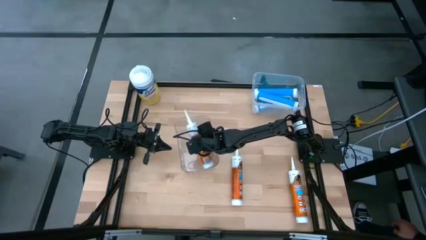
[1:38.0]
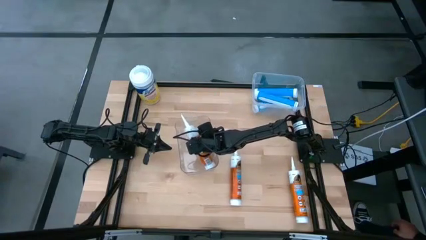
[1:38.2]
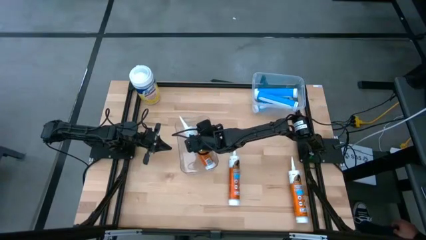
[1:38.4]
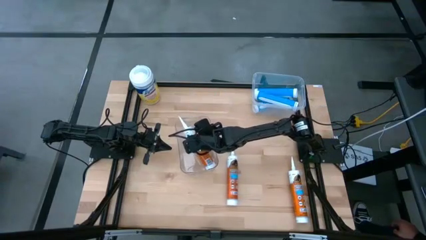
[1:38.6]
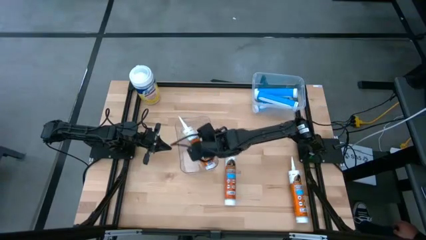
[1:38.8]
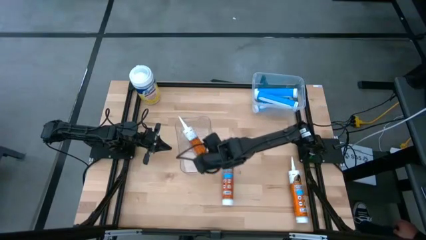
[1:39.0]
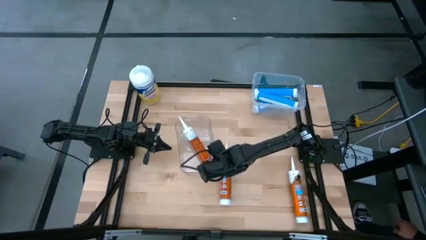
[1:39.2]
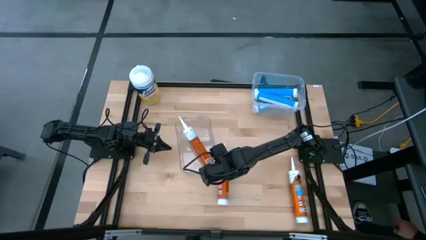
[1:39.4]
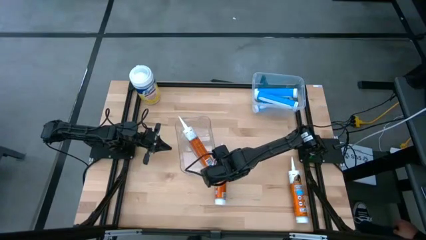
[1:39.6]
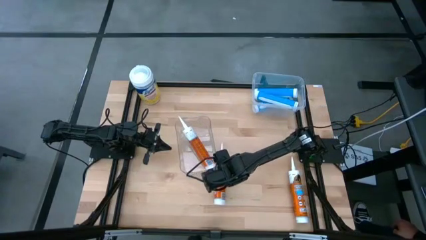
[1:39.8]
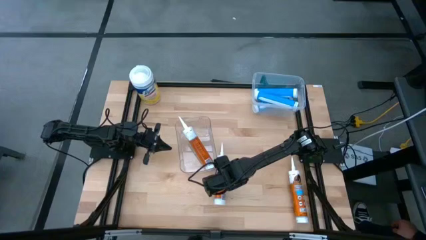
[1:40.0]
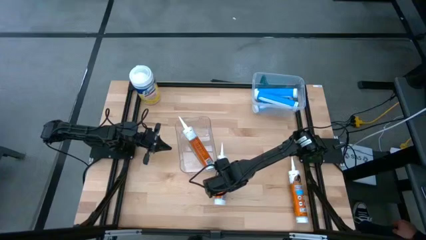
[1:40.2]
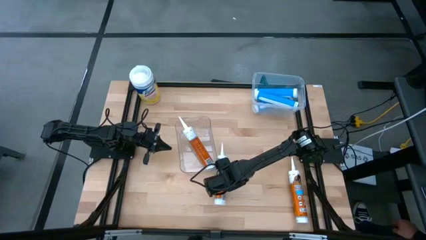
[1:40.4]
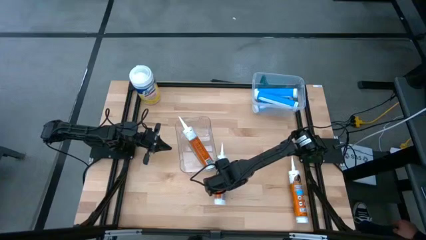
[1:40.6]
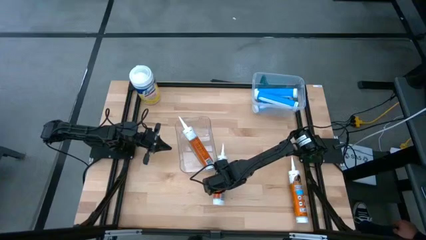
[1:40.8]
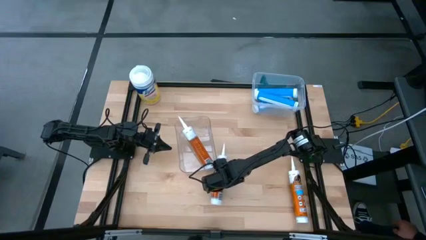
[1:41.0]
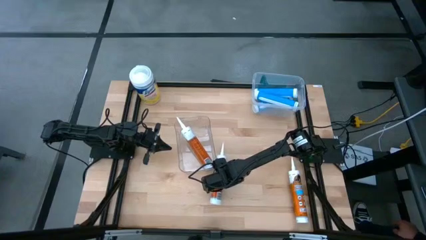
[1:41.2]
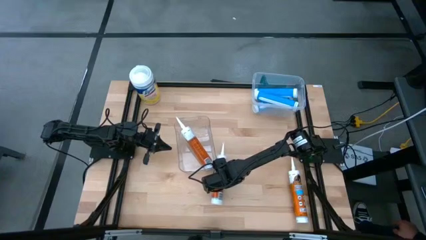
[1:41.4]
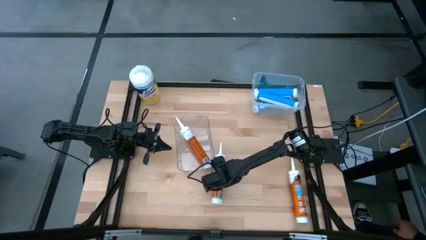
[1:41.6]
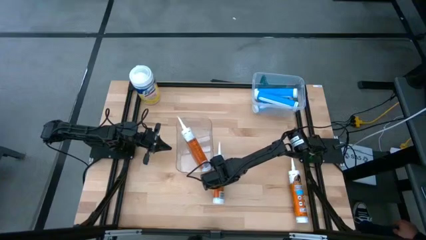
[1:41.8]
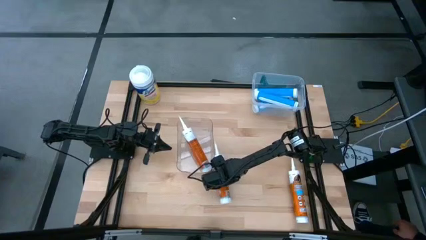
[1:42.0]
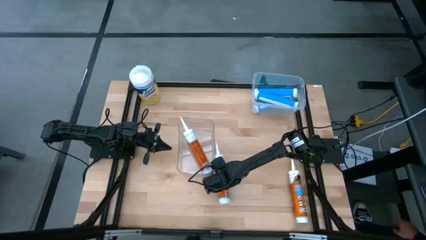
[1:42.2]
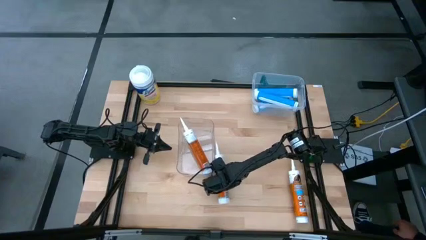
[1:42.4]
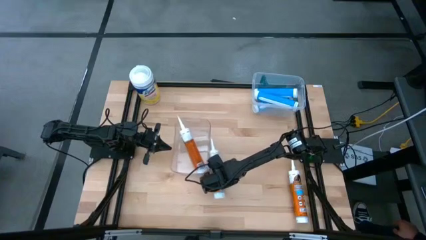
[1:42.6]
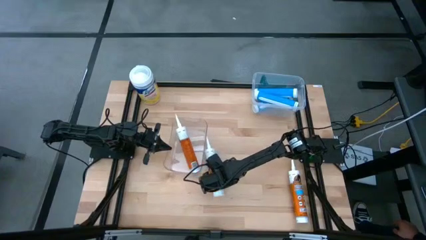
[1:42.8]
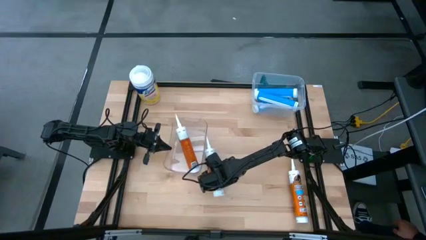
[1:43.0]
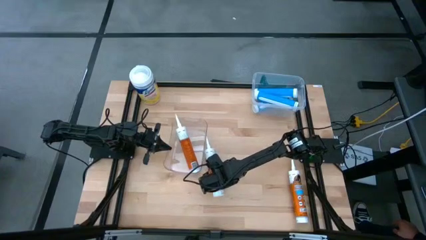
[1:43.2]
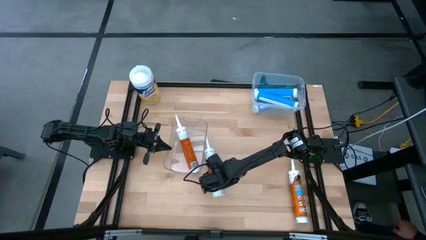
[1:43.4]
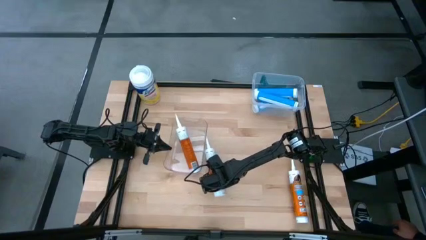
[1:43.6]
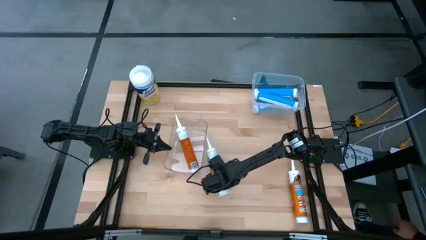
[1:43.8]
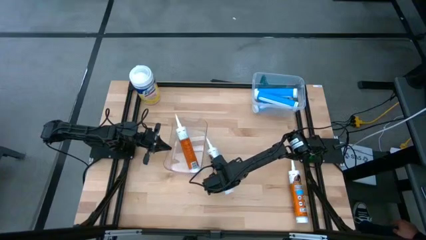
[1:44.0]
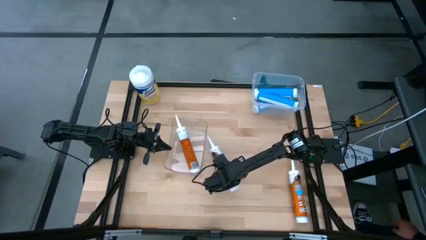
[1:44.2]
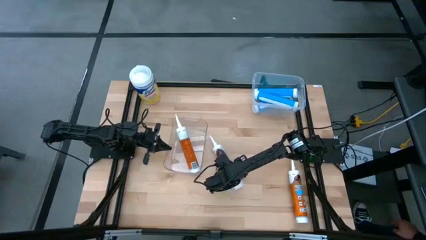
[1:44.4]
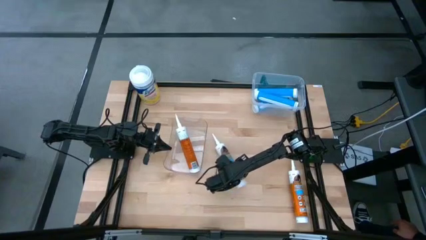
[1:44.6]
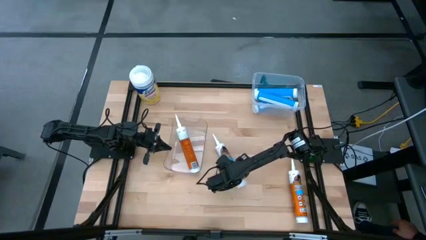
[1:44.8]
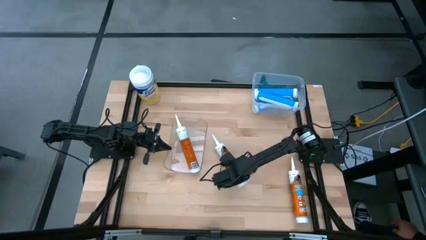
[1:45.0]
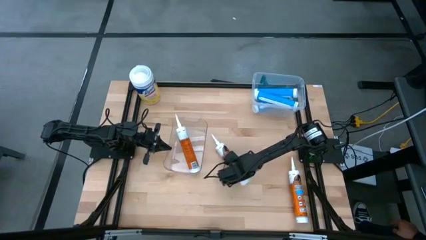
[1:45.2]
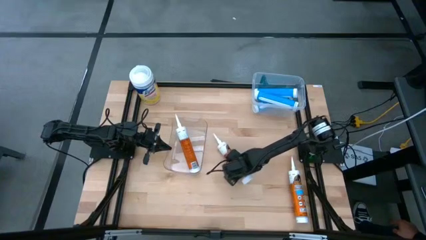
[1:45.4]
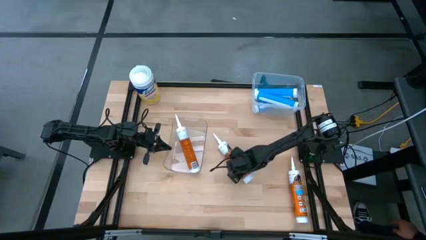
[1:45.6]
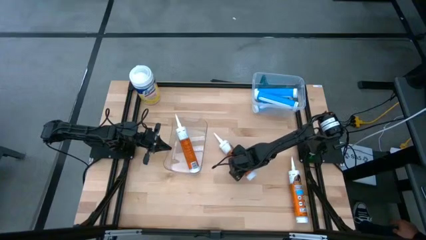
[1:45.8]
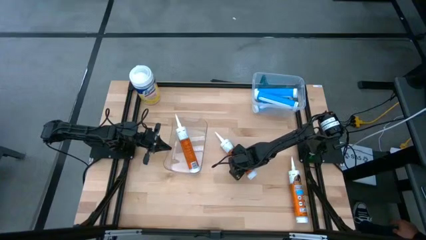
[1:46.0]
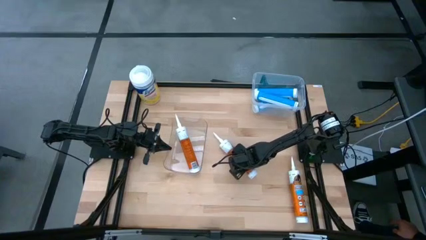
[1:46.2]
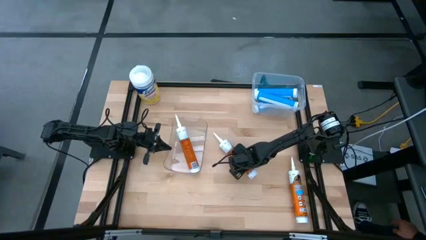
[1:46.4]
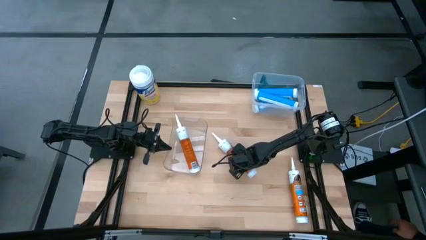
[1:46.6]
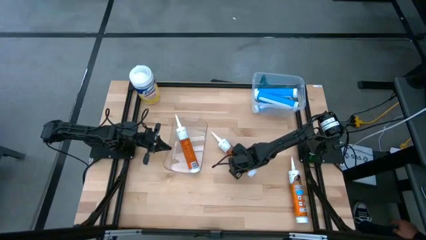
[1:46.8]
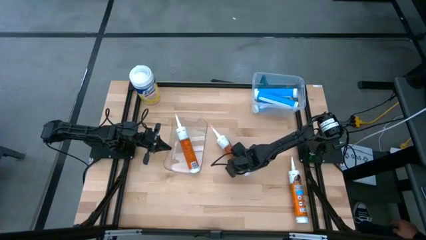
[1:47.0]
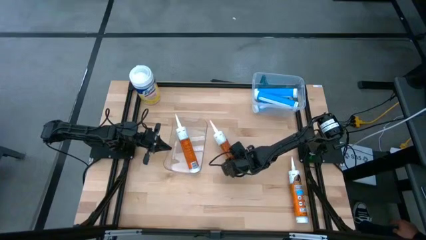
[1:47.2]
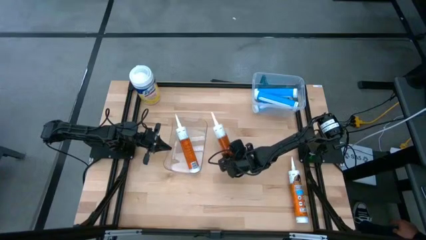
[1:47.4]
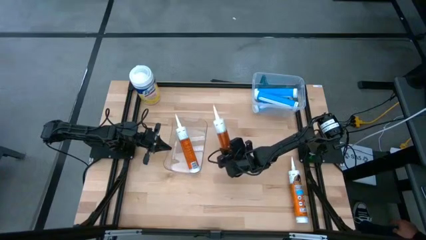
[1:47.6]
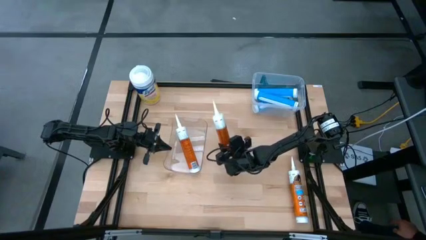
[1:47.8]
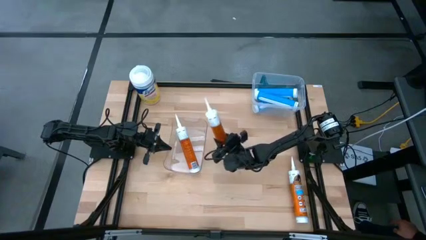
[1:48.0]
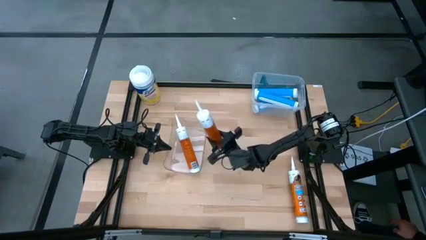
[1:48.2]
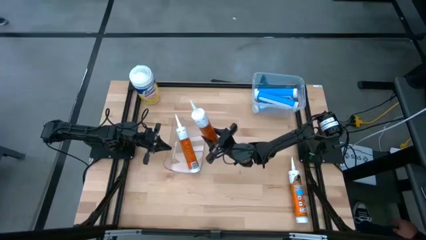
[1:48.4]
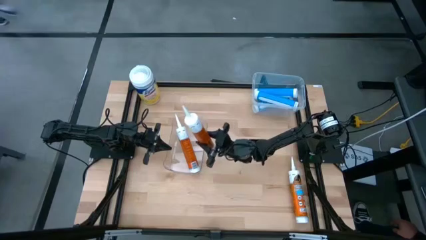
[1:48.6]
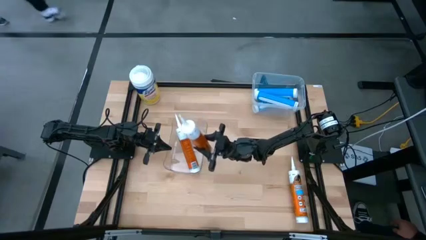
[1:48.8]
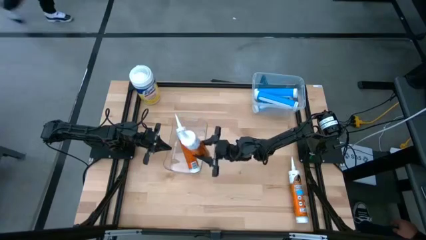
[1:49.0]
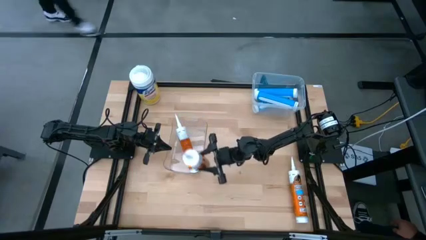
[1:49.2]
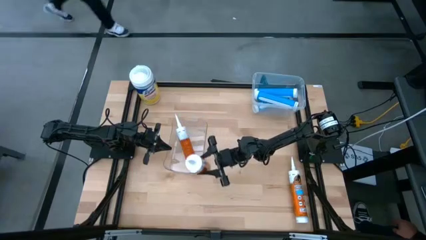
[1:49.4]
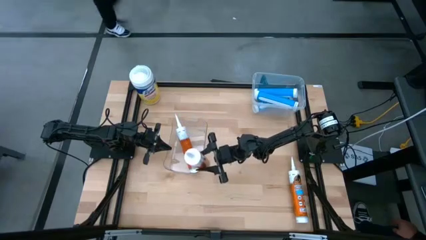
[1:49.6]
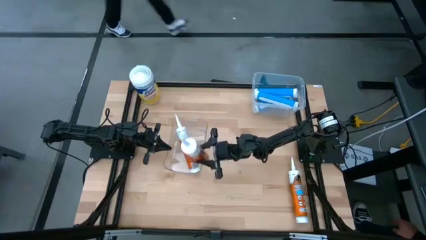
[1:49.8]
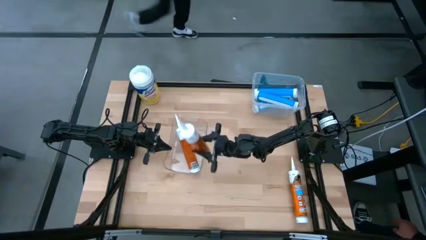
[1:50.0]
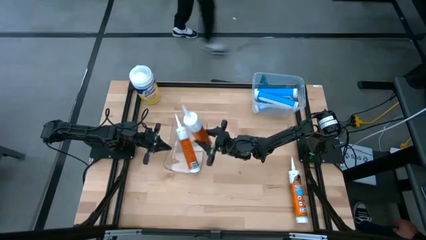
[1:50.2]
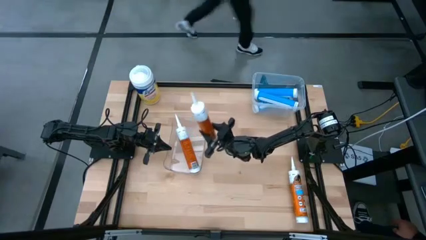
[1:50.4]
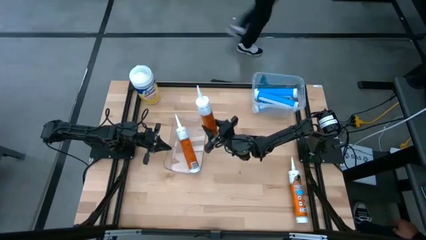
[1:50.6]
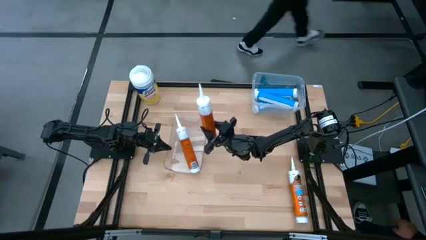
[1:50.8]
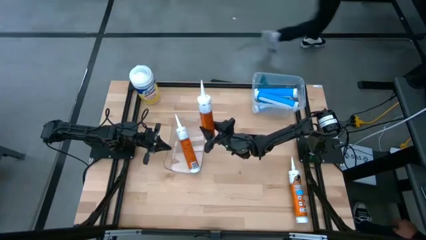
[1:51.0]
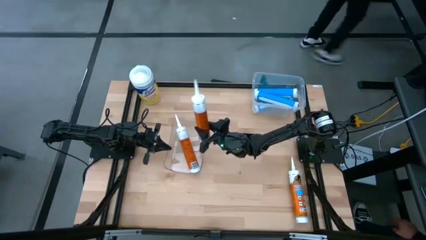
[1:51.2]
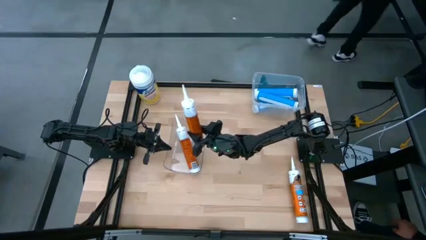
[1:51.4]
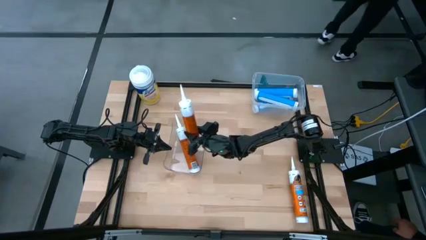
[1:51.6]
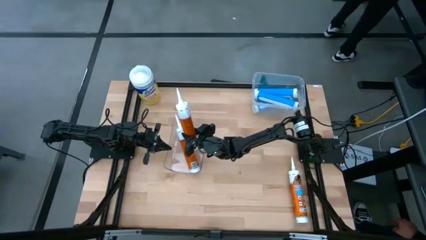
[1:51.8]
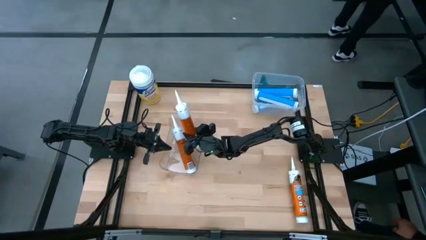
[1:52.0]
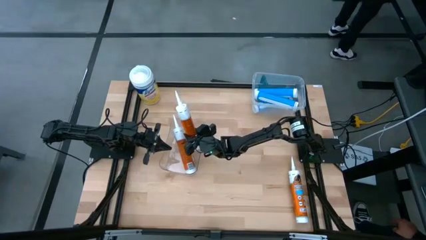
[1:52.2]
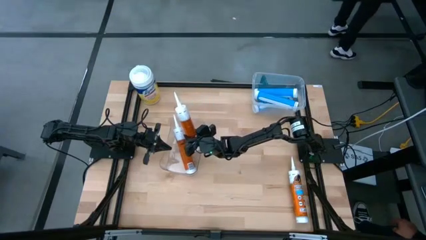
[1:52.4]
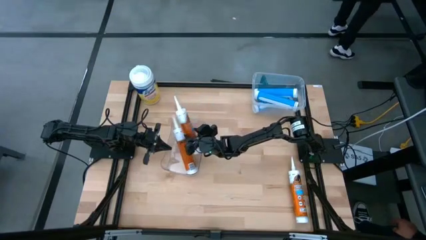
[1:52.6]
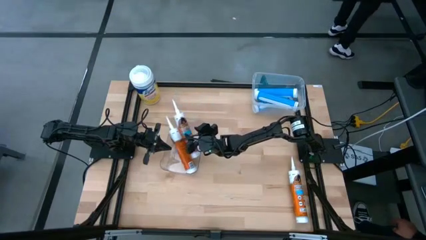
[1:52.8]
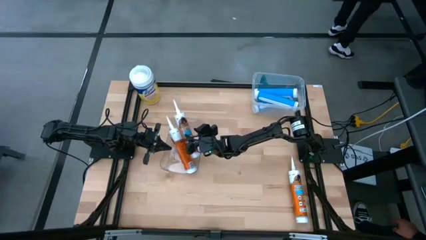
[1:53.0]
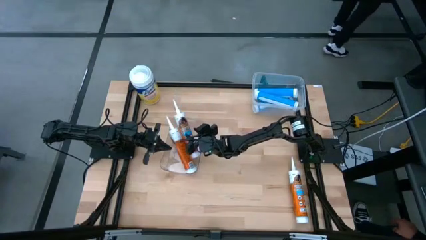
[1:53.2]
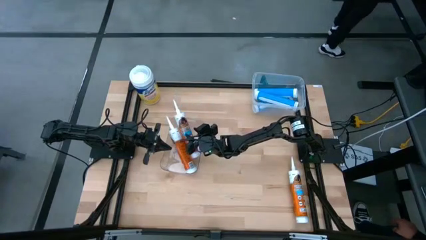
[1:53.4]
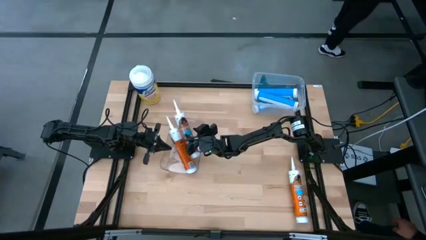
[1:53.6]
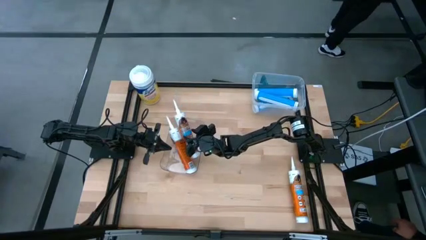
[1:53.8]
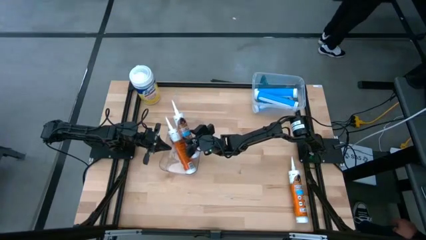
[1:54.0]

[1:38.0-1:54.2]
Task: Pick & place silicon tubes, Sealant and Lysol wipes
Put the top orange sealant into the transparent bin
